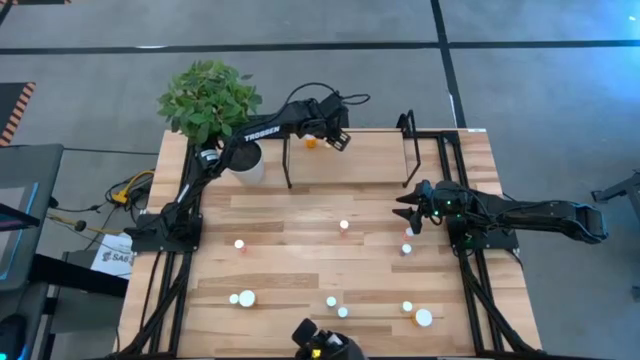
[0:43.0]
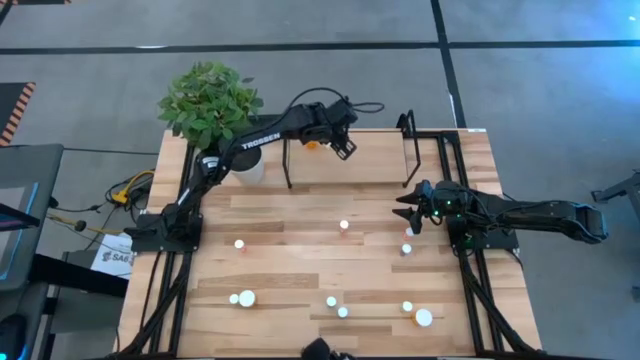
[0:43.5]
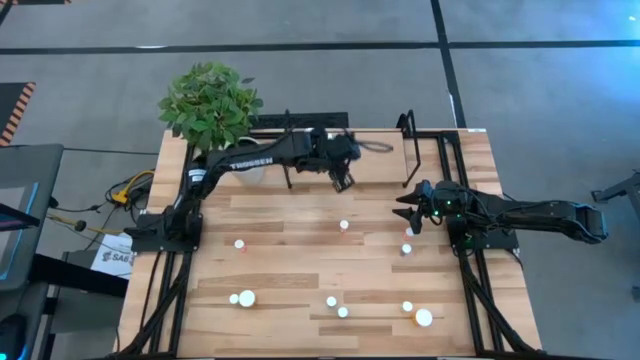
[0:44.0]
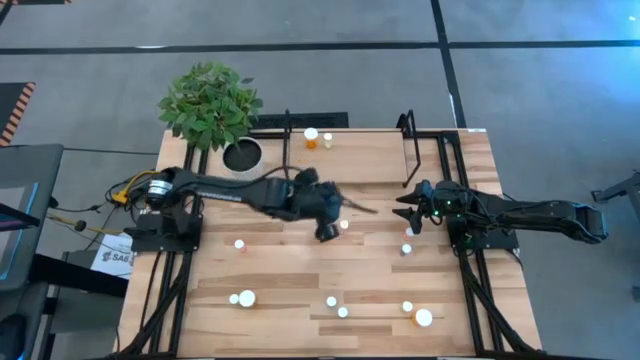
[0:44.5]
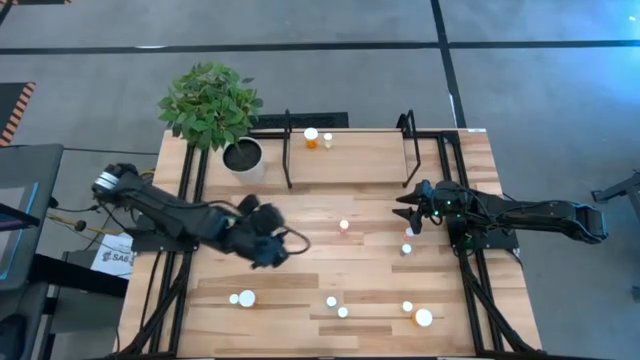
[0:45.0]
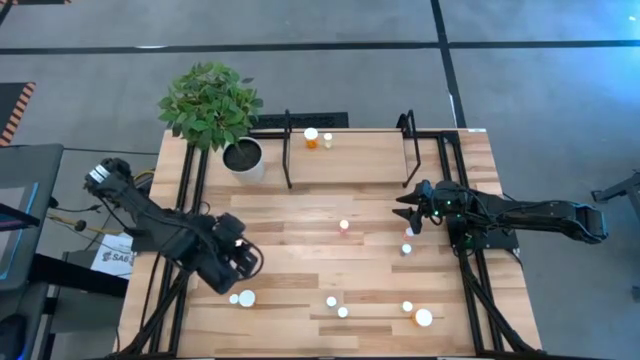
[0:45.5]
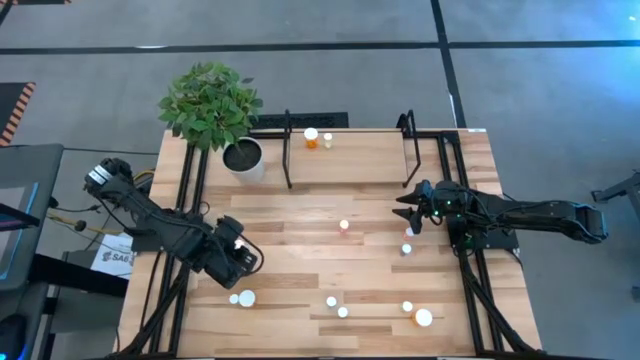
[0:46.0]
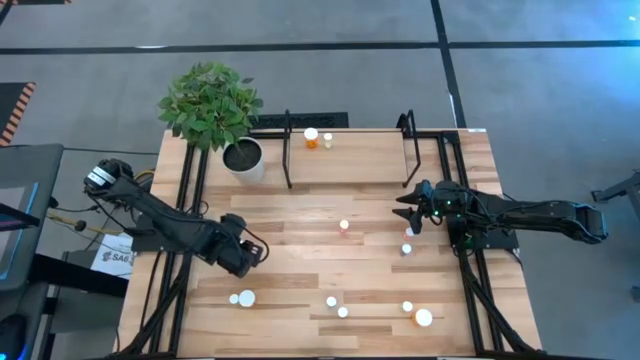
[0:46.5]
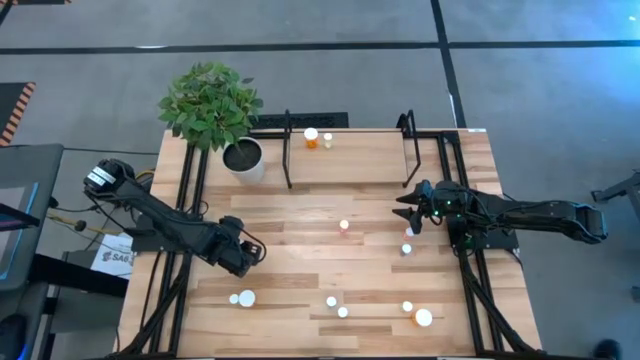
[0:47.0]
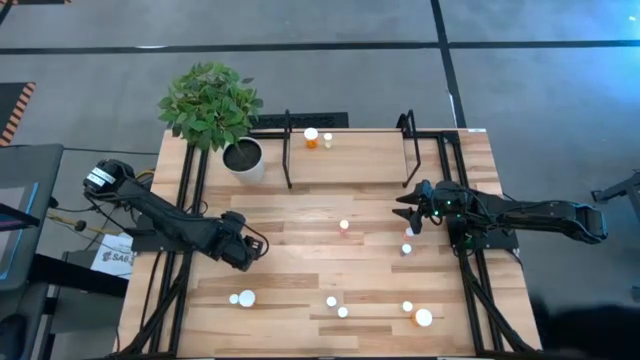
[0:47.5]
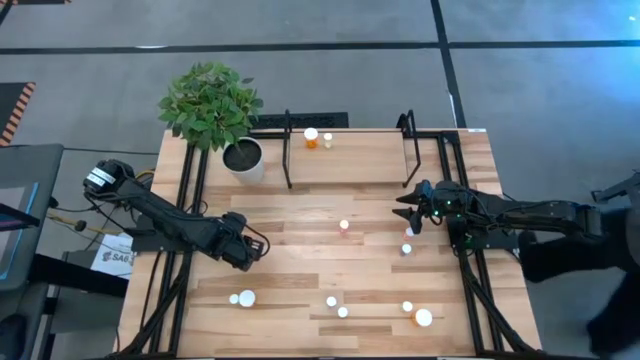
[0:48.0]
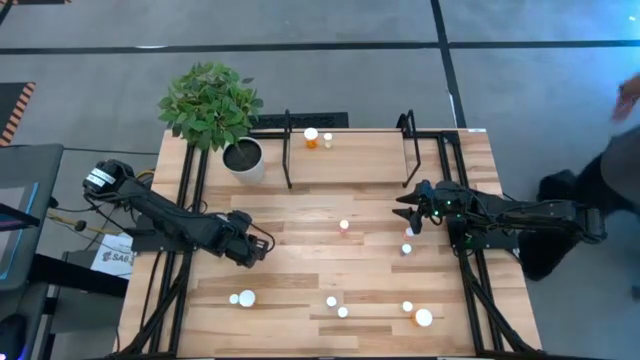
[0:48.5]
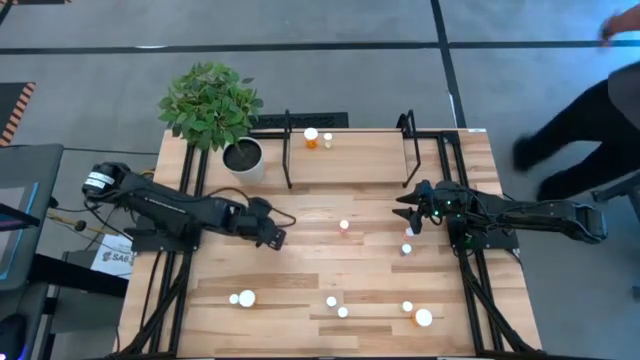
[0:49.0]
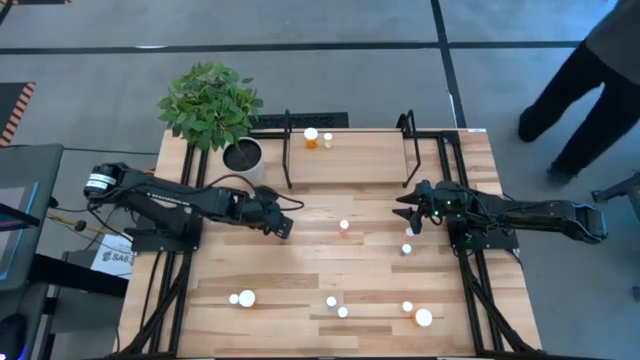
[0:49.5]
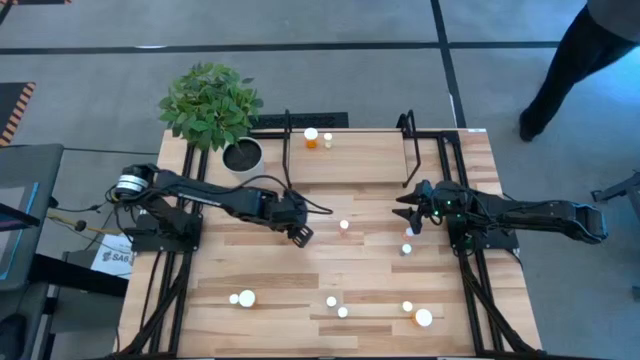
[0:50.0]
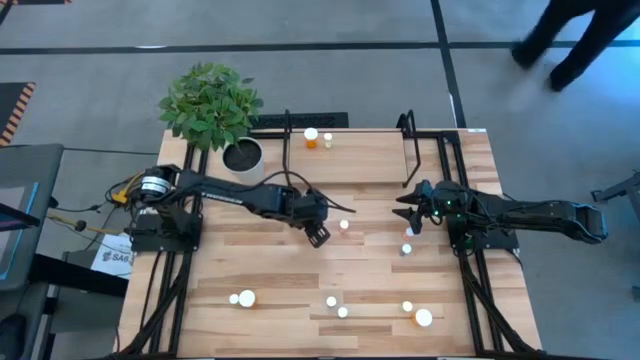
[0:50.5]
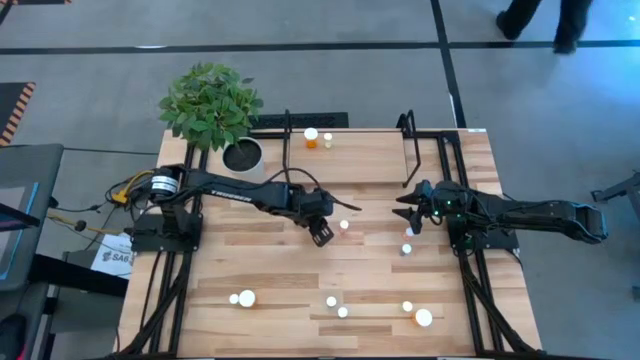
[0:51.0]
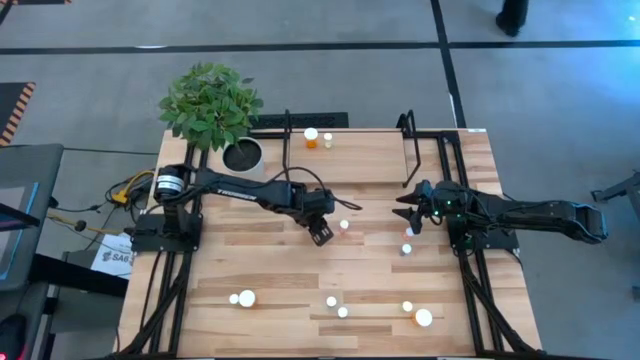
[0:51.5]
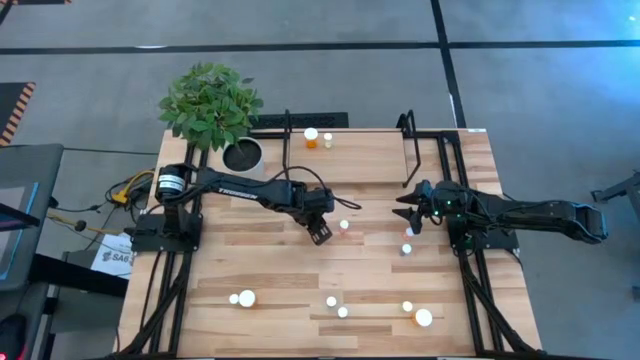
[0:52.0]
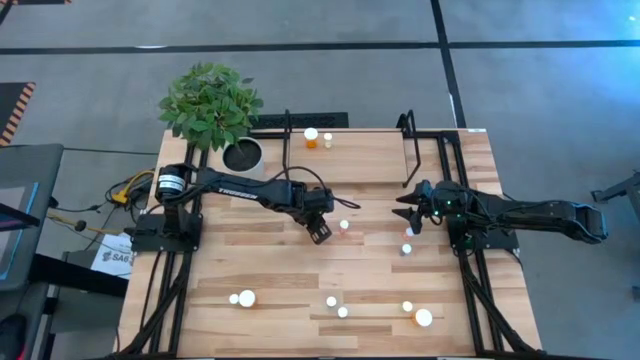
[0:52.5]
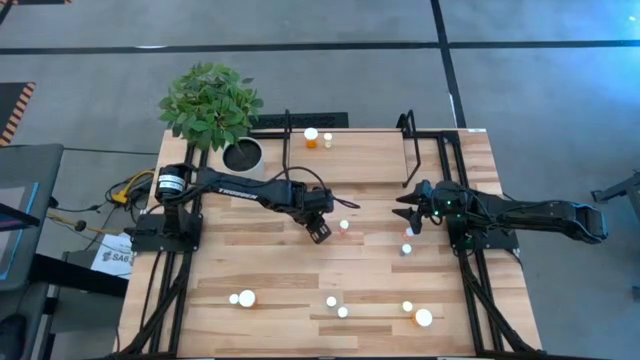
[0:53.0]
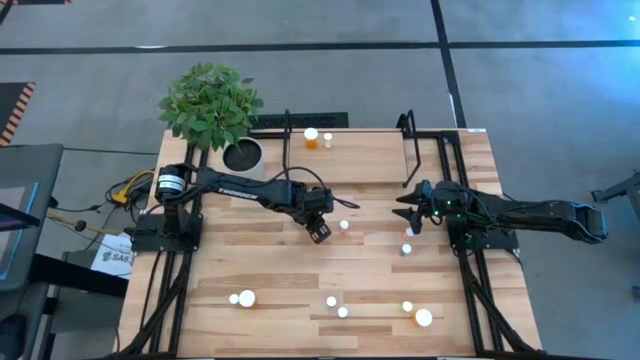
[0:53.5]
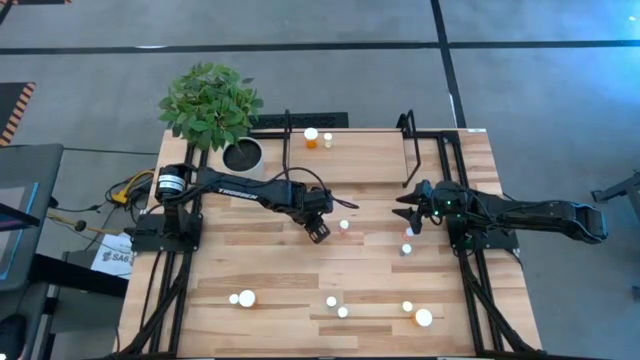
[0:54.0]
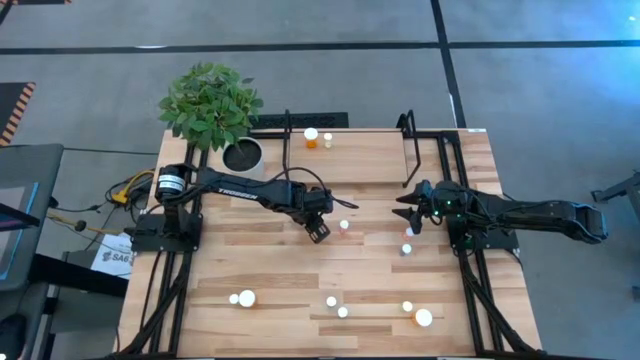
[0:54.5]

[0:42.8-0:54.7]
Task: Pick and place medicine bottles onto shelf by color
Move the pink pill bottle to the center of the table

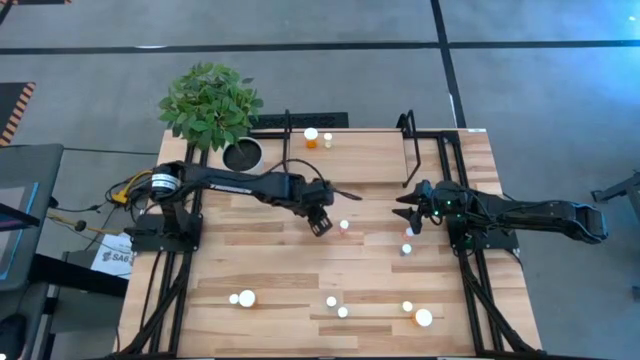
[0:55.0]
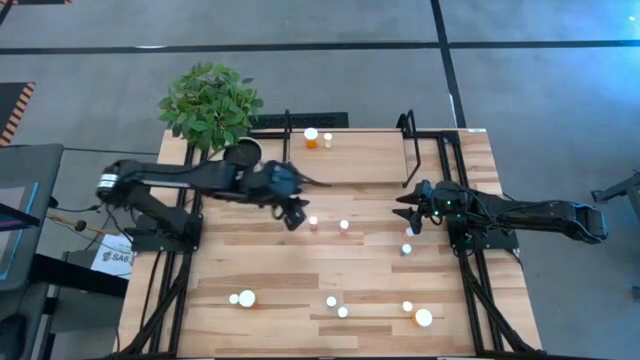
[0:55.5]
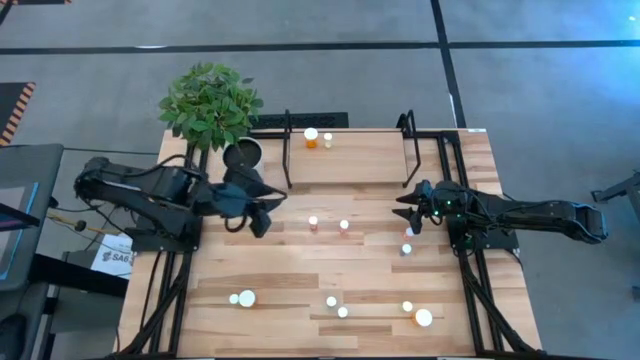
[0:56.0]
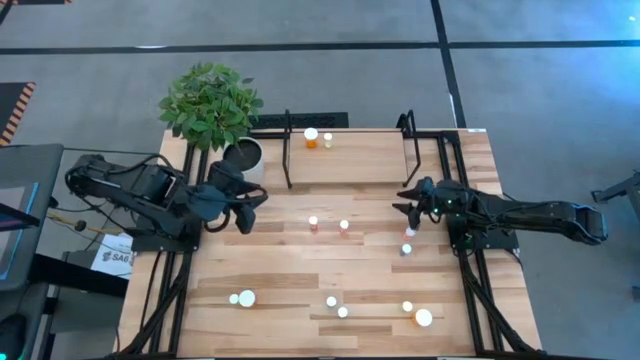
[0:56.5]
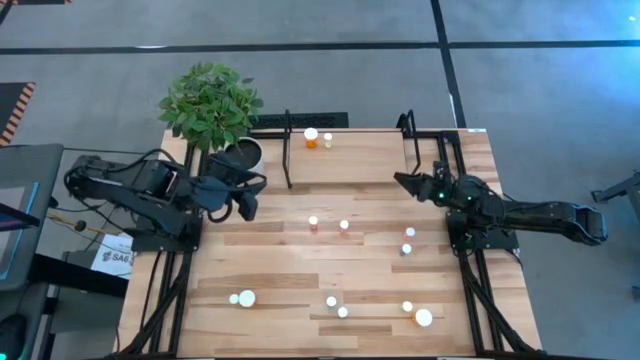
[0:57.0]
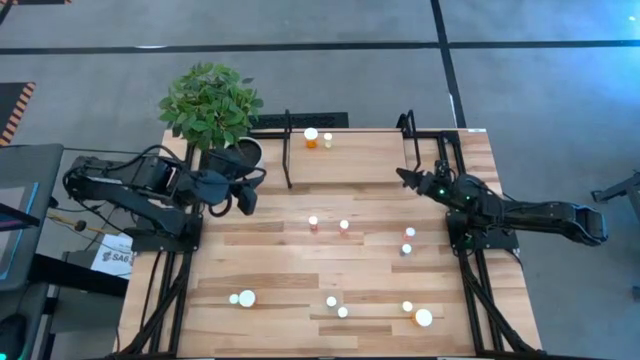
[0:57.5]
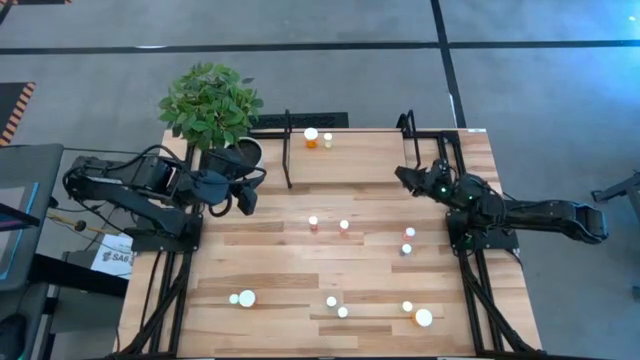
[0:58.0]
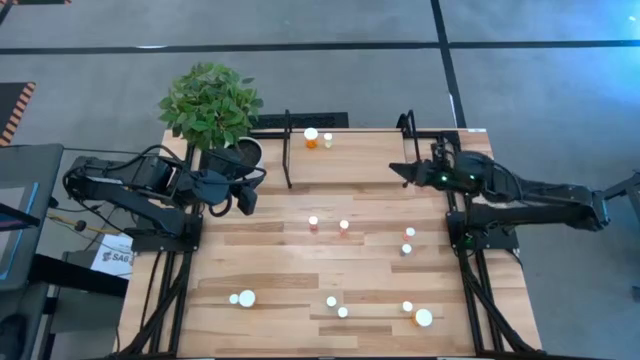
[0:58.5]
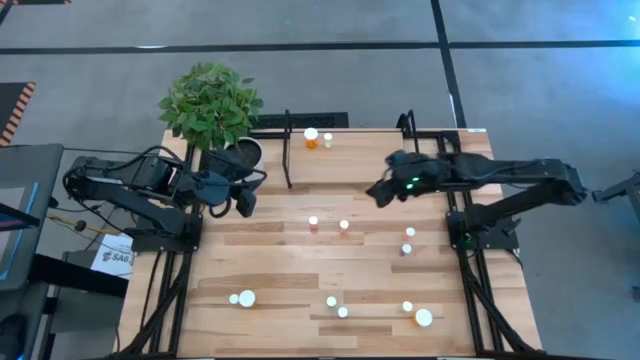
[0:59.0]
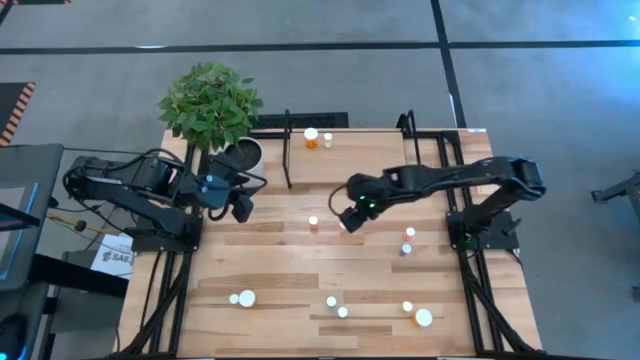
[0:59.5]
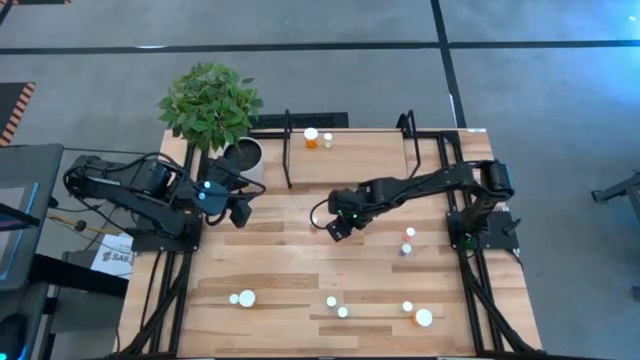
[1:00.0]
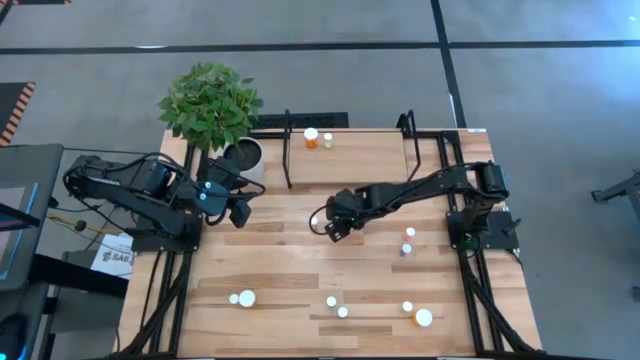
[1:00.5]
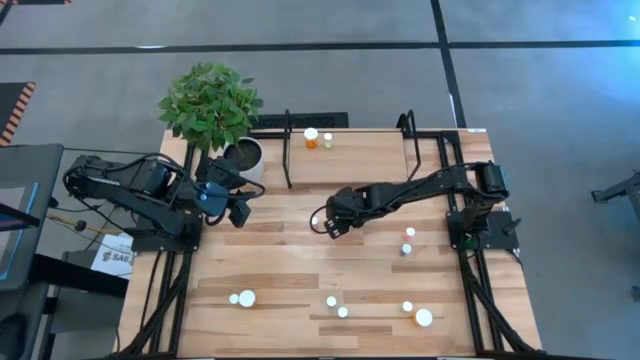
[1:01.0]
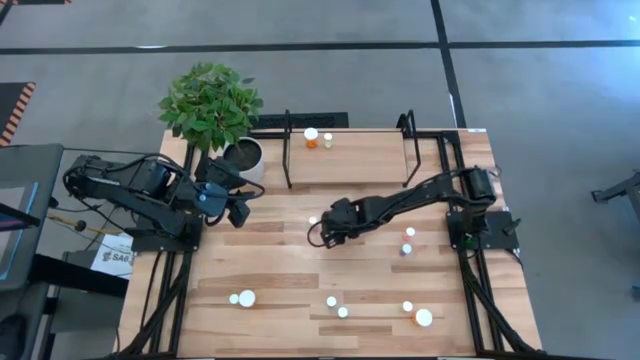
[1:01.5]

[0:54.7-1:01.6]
Put the middle pink pill bottle on the shelf

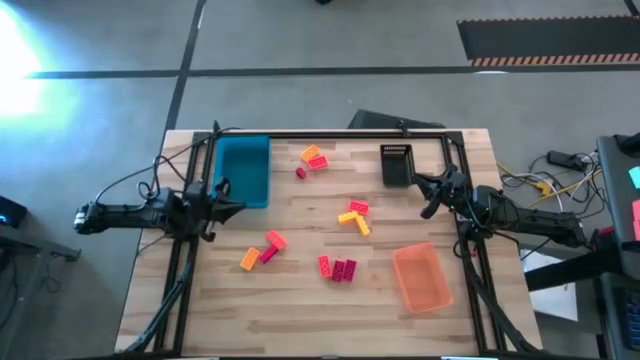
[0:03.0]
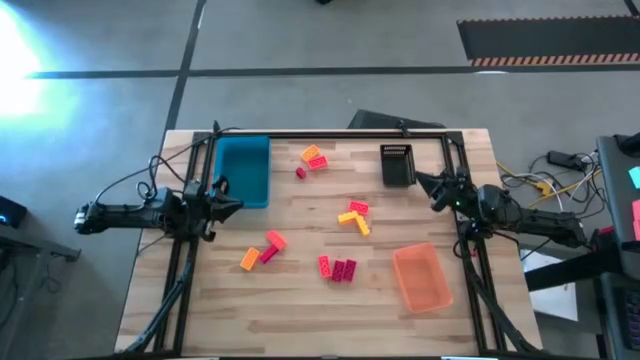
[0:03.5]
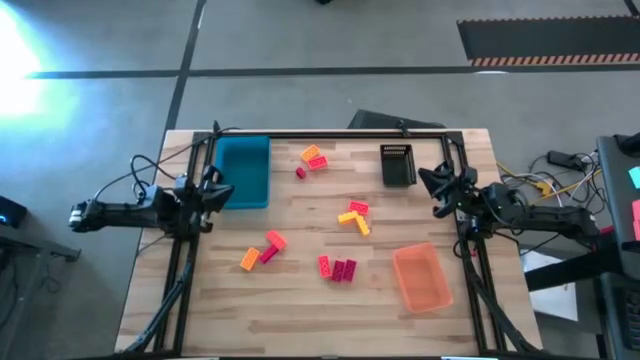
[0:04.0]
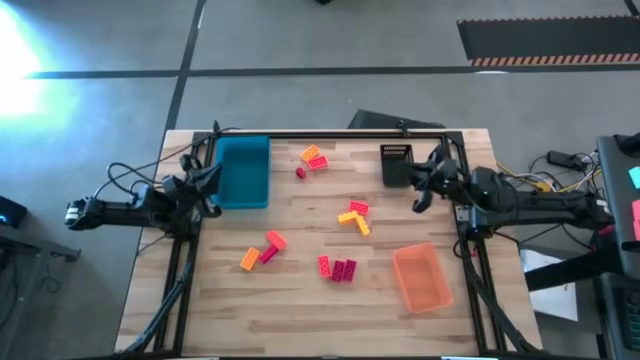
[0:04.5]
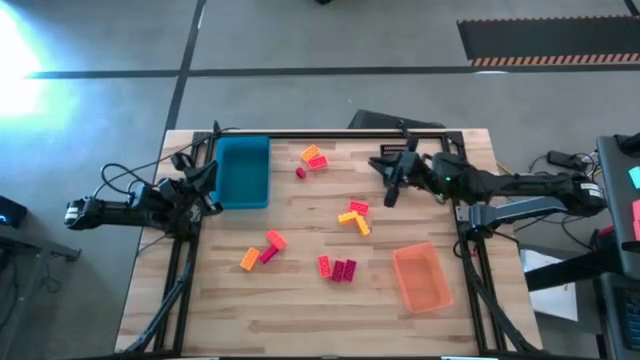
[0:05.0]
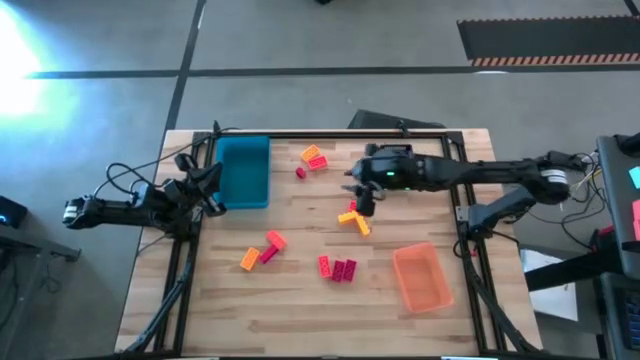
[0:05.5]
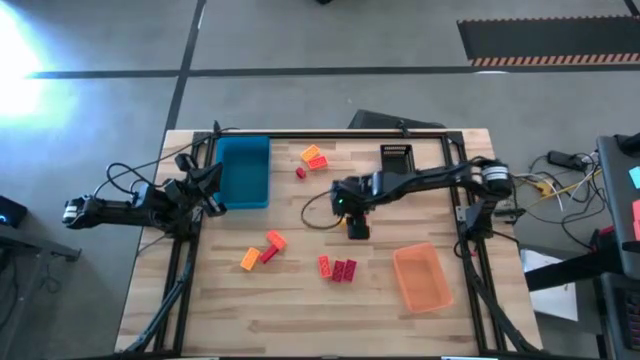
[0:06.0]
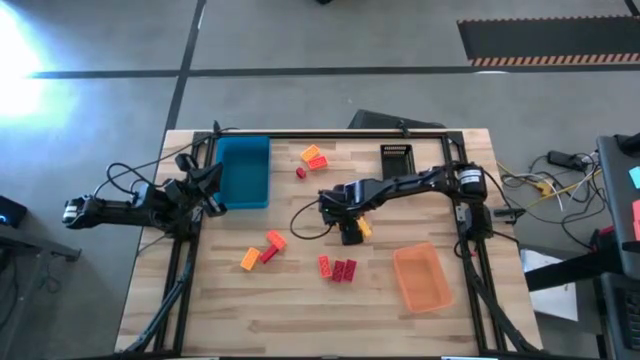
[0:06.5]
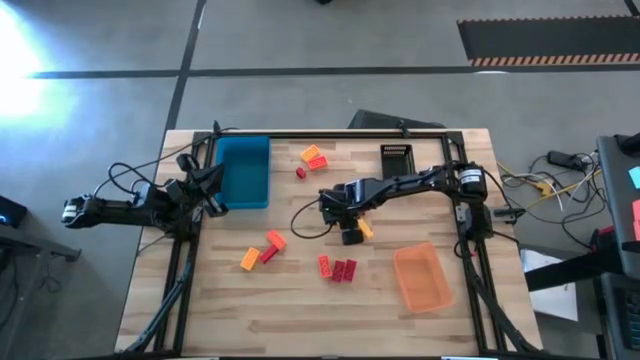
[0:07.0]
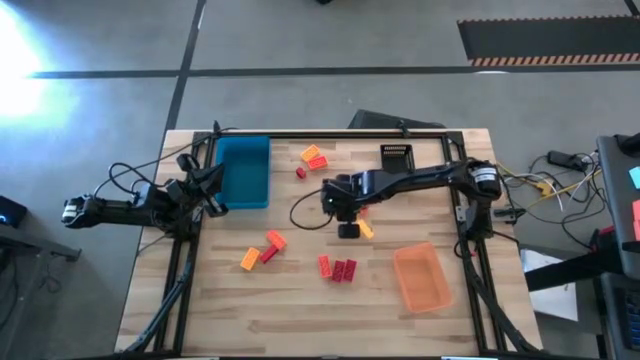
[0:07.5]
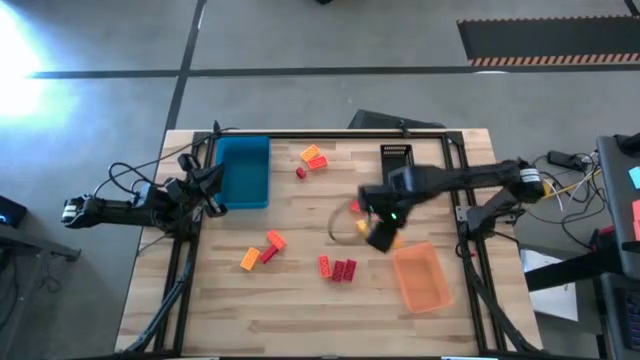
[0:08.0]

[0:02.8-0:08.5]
Task: Sort & place blocks by color
Put the yellow game piece on the orange bin
